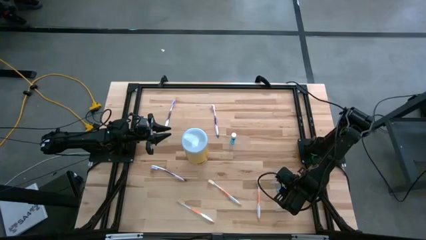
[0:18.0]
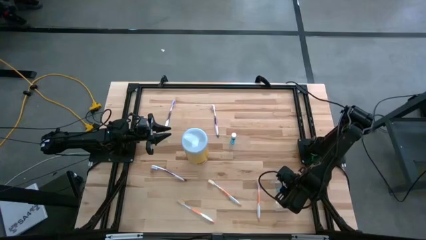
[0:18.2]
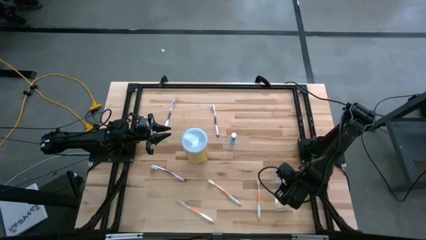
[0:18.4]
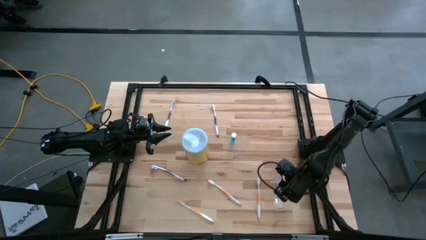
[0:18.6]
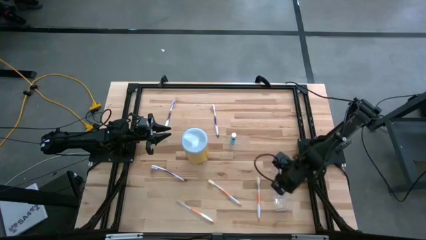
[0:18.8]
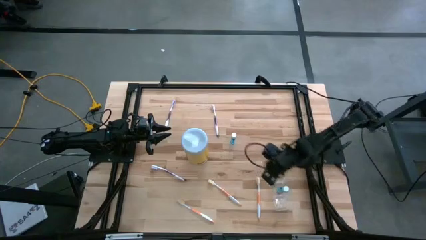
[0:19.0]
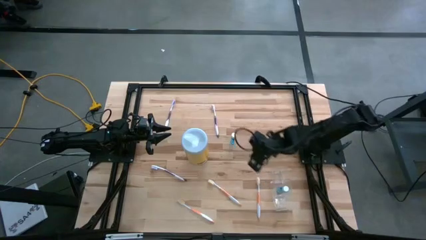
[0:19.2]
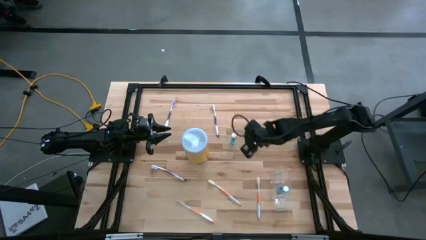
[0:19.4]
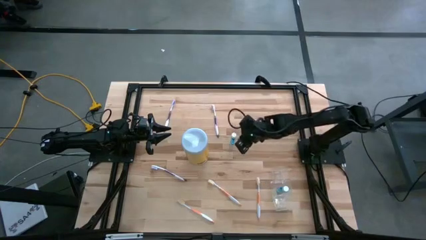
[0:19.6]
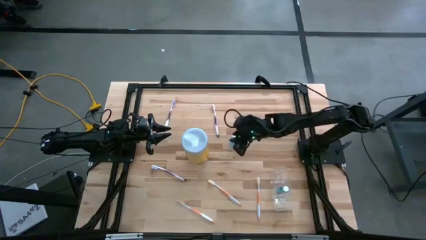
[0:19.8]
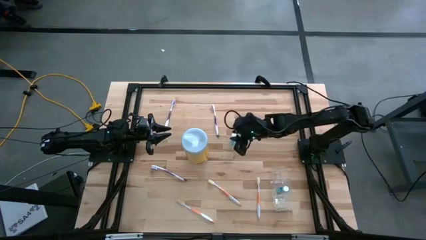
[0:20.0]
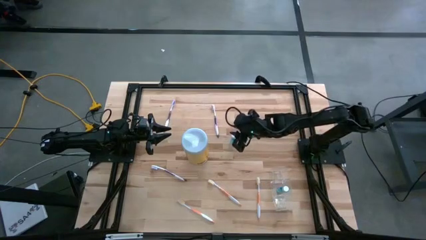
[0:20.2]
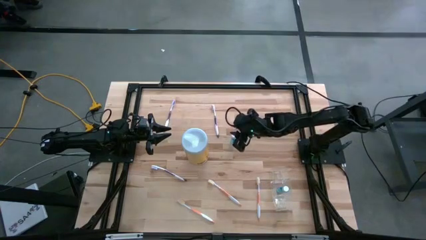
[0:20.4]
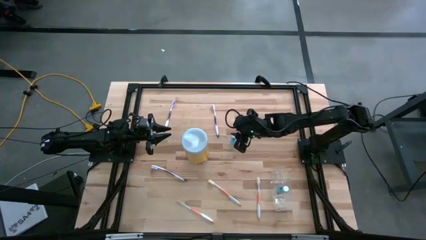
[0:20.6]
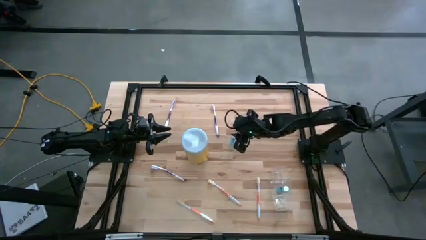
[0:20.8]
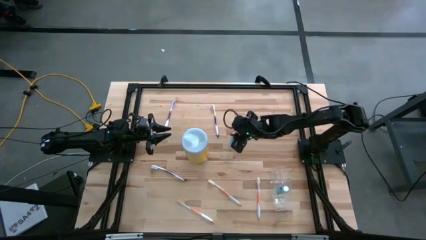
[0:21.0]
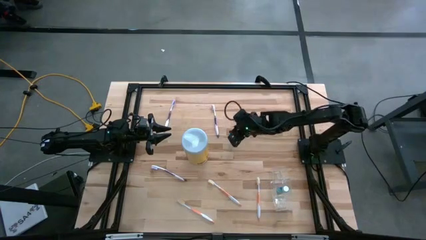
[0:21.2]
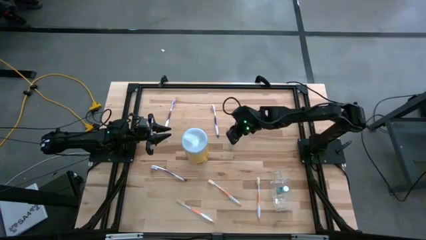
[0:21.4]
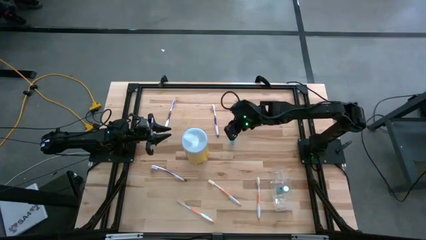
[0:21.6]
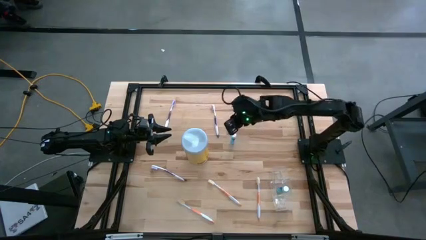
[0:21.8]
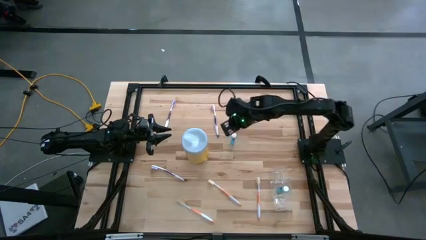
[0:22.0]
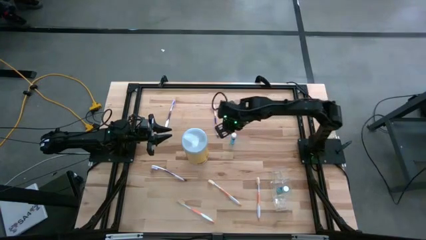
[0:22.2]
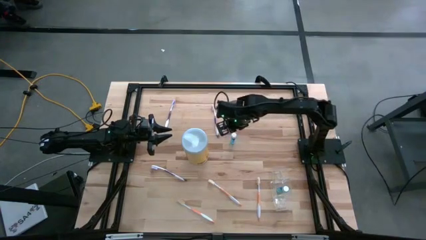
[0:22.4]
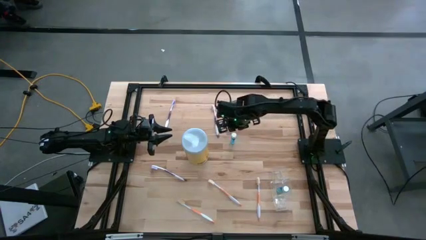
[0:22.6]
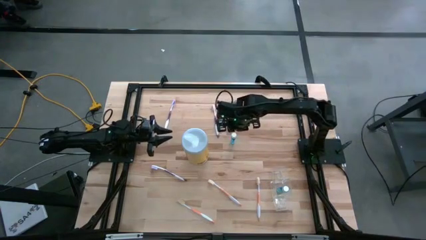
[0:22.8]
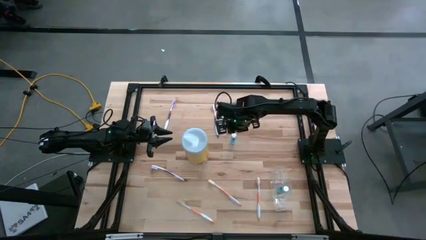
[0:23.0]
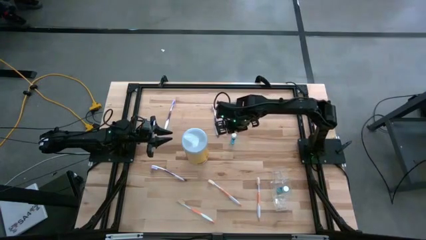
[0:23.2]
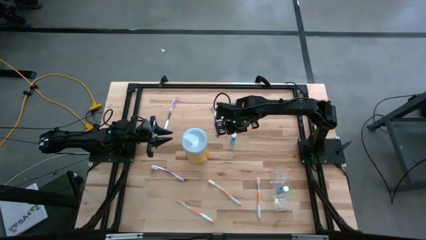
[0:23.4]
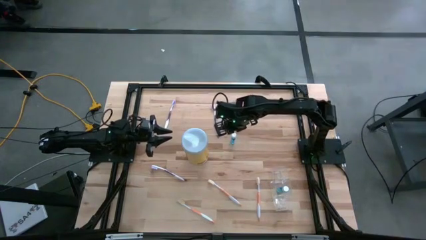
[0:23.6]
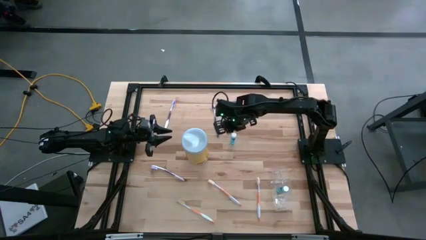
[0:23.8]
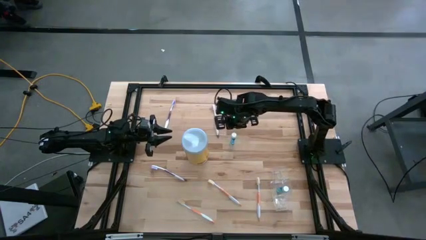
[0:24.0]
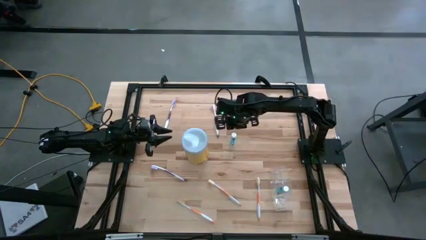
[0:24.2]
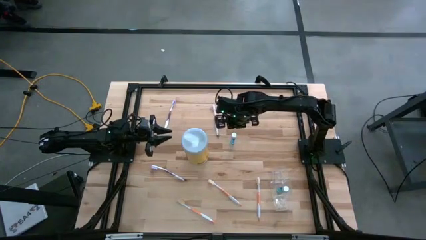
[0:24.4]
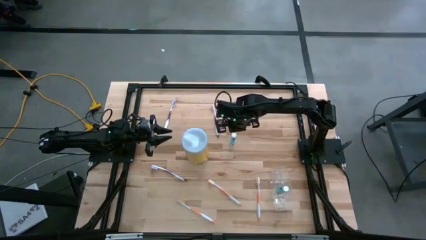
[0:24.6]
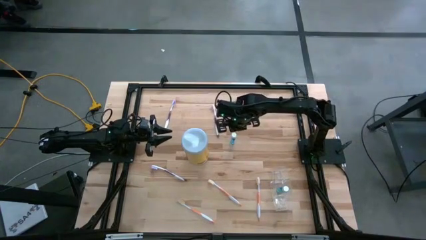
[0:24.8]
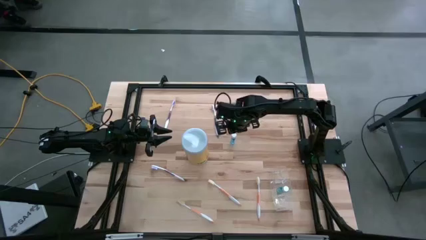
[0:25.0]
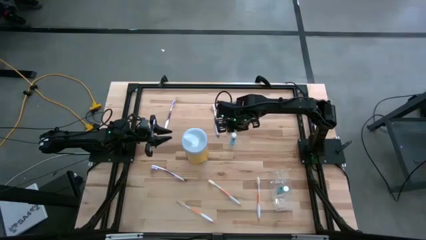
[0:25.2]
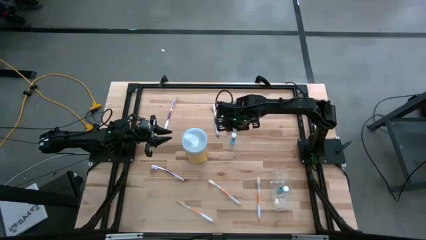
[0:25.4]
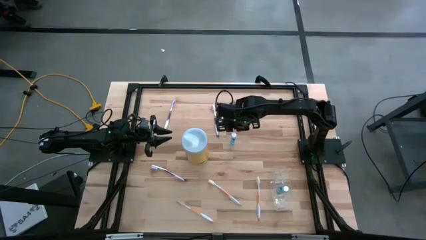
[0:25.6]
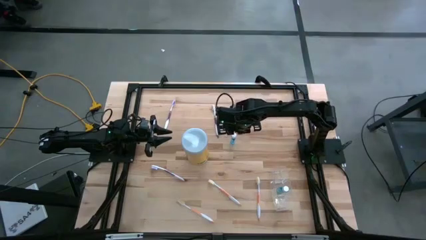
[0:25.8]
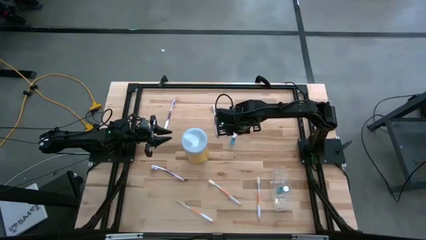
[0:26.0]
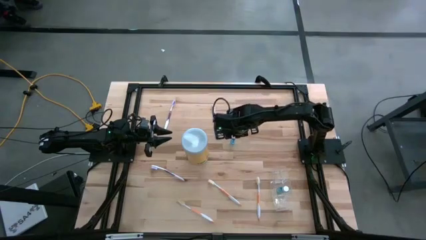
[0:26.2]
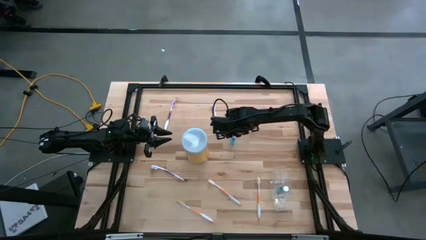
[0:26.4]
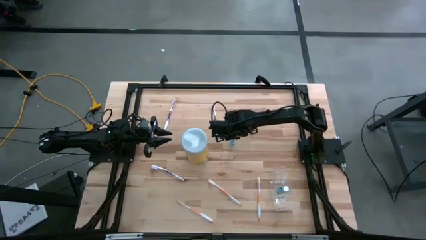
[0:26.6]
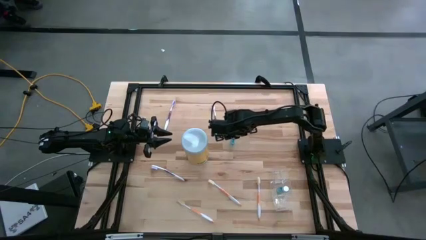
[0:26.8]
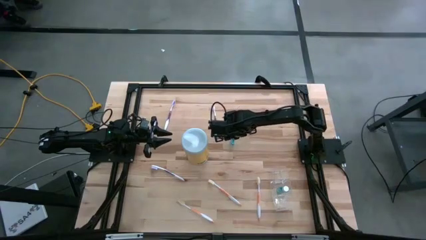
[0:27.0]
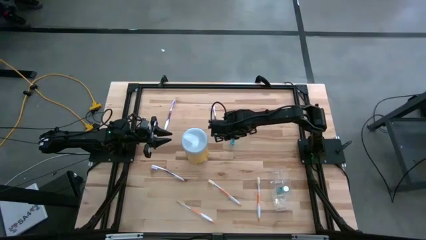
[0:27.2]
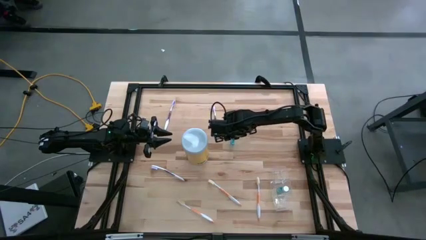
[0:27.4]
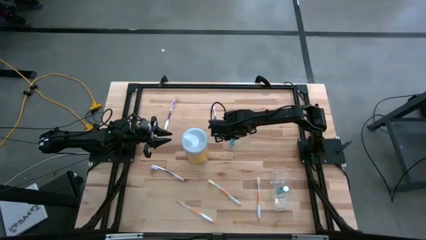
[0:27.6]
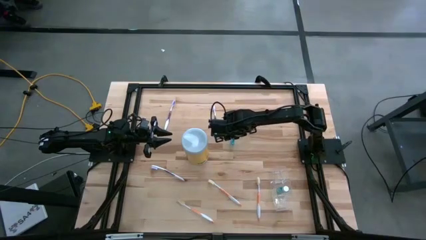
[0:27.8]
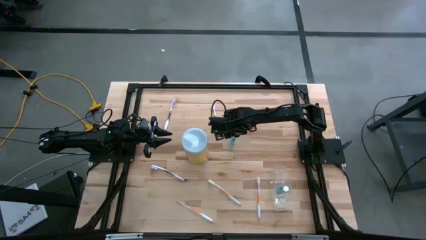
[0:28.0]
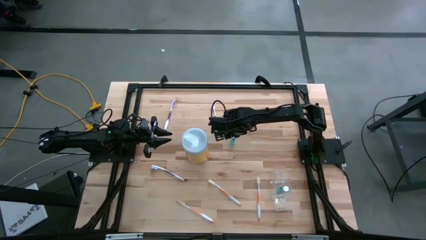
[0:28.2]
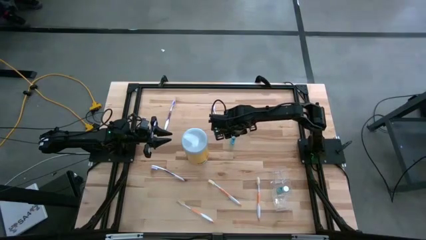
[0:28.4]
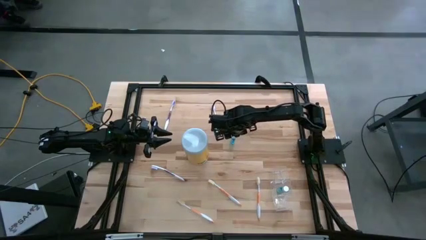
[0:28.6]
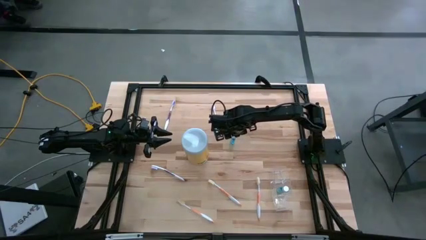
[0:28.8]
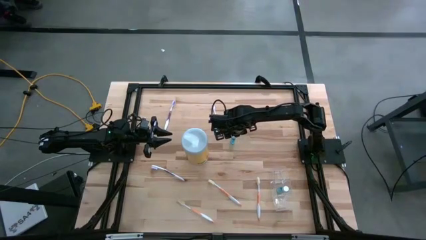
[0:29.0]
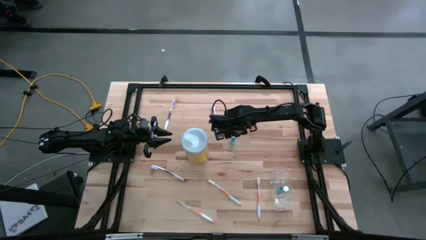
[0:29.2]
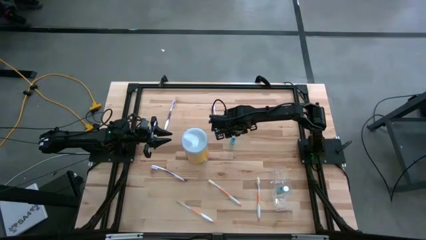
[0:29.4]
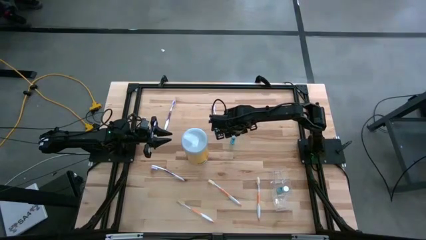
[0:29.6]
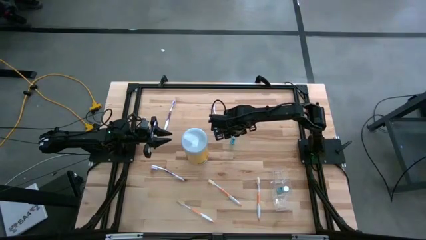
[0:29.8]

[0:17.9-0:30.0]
Task: Pick & Place toothbrushing station
Put the blue mouthwash in the middle section of the transparent organizer

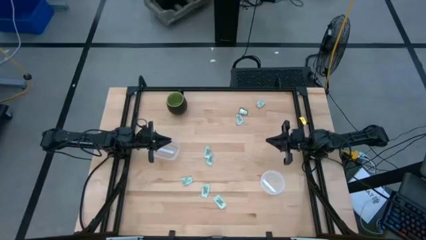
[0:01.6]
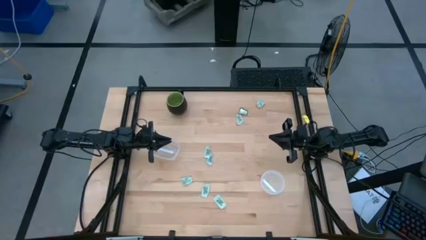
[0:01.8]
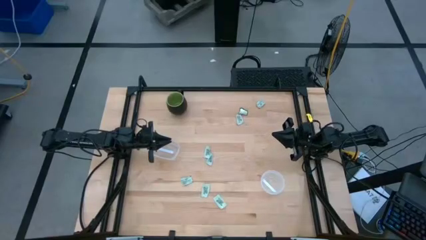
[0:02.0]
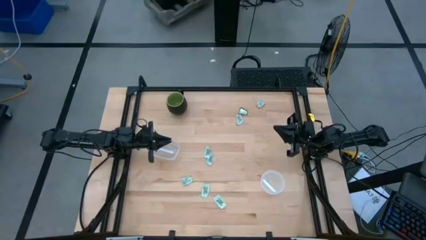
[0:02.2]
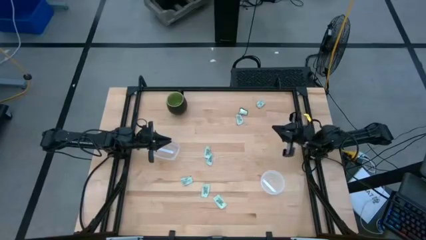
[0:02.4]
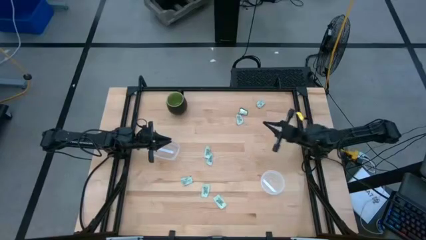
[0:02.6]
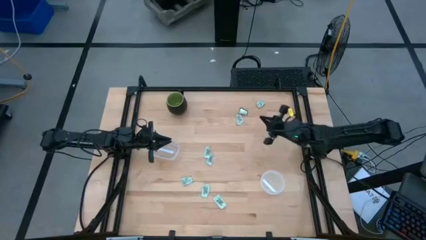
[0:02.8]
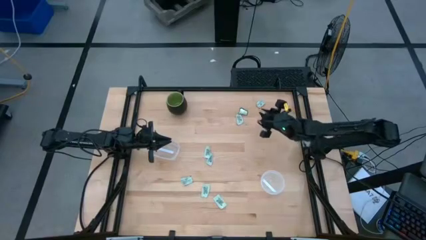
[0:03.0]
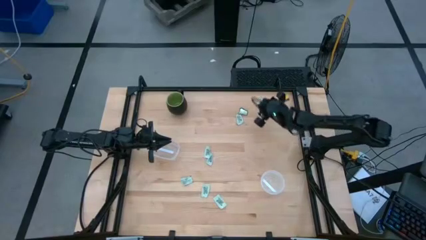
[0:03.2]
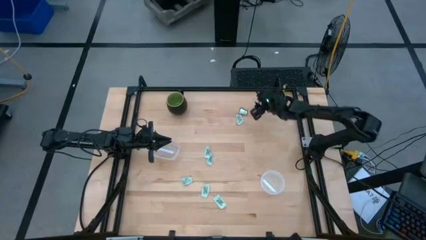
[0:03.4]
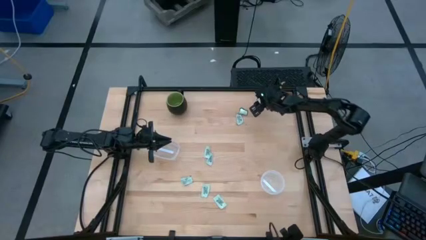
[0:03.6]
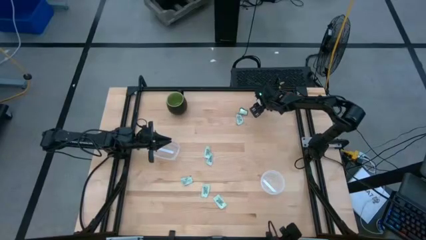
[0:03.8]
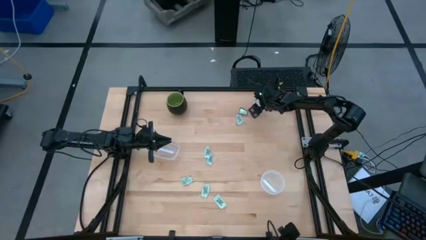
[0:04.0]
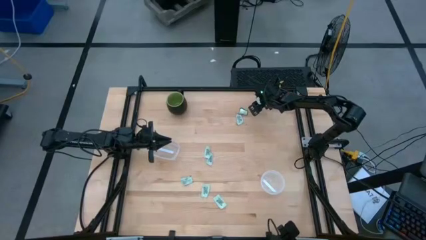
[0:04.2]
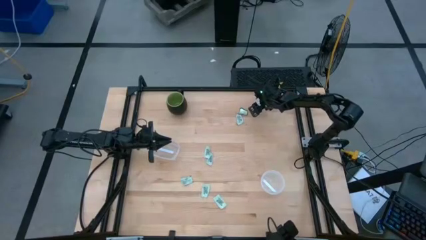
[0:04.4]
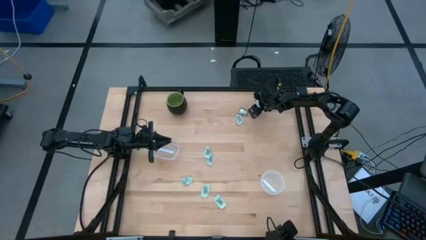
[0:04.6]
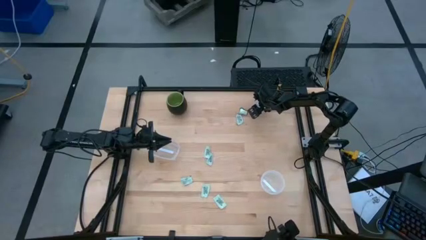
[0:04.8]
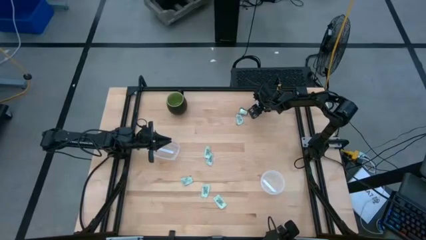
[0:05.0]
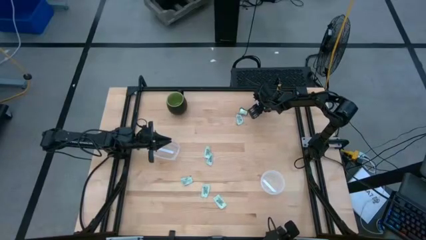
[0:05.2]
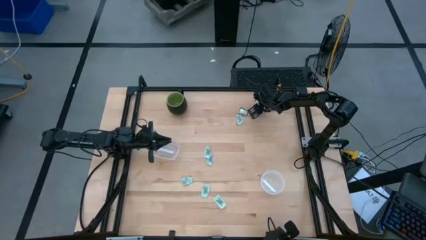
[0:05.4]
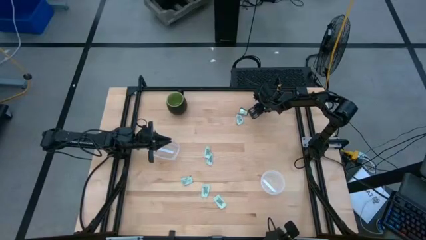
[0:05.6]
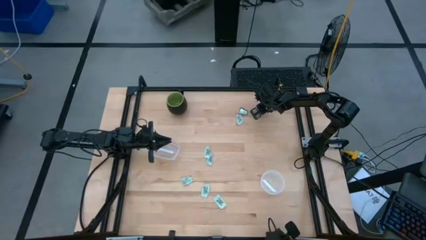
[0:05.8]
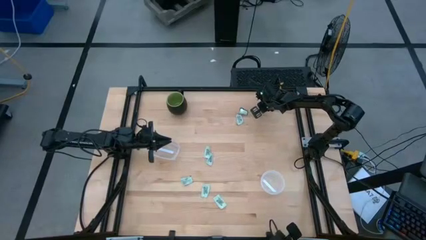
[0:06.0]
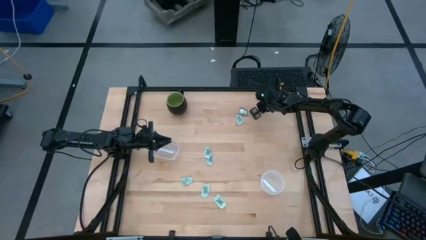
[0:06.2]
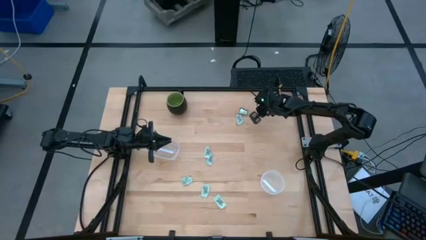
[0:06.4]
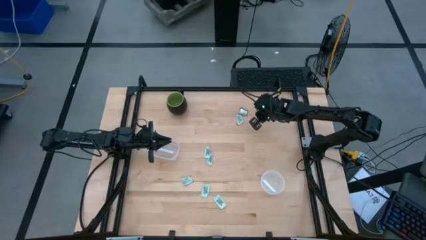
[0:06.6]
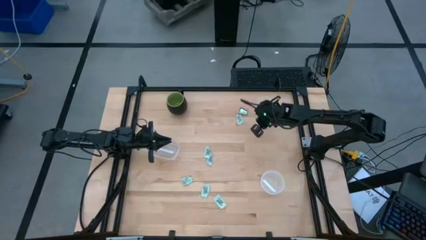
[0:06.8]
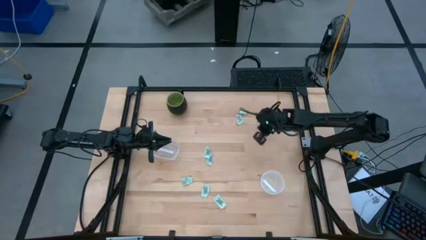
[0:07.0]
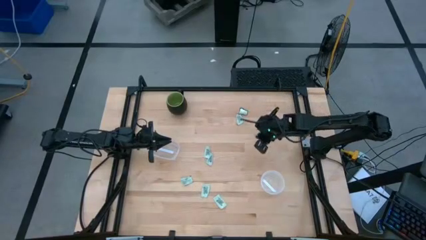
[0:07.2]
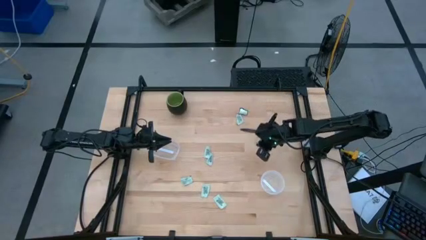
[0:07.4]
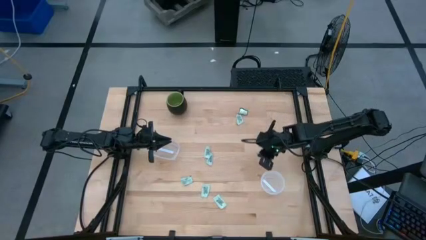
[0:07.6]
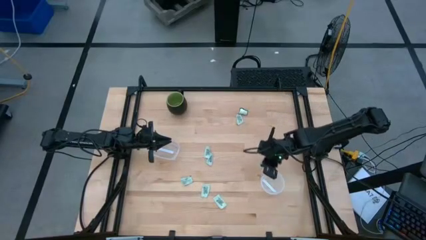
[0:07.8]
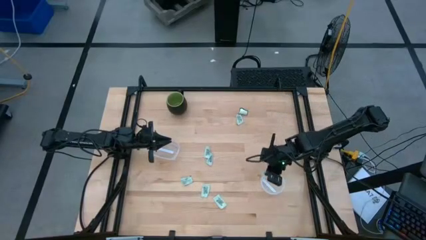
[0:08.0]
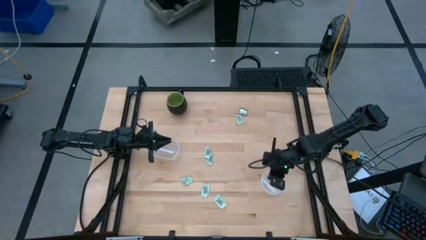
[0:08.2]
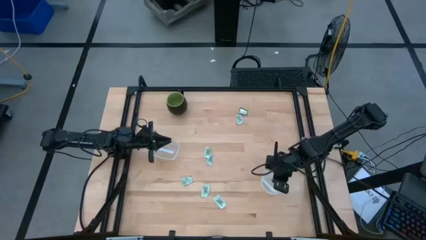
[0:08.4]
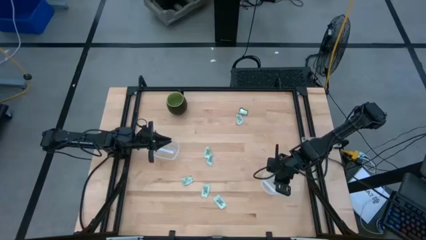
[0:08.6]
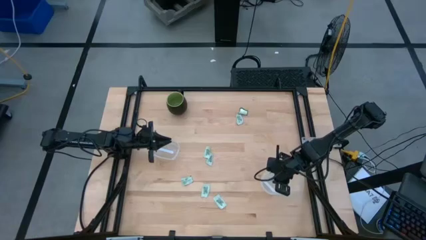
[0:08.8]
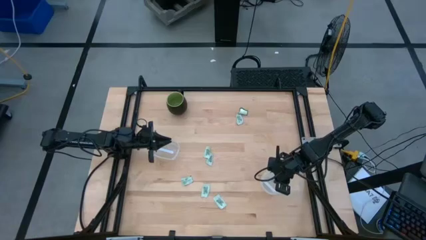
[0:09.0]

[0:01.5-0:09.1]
Task: Pick and place Stevia / Truvia into bins
Put the white stevia packet into the right transparent container
